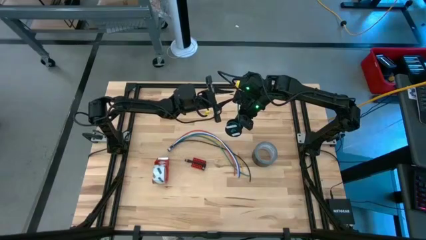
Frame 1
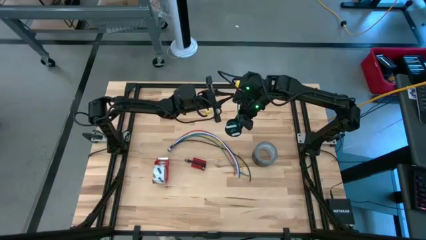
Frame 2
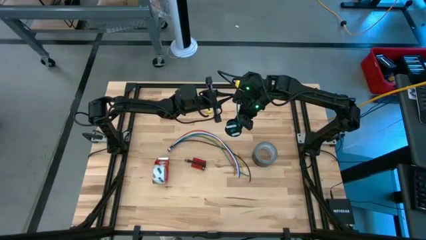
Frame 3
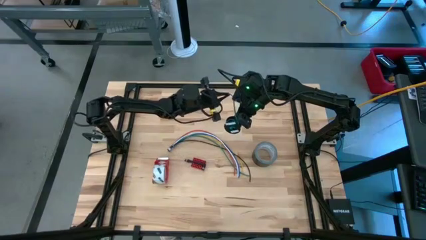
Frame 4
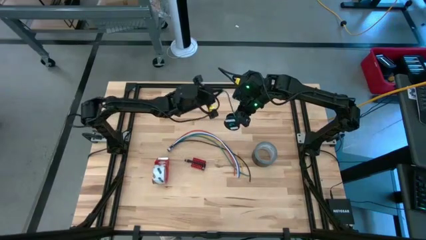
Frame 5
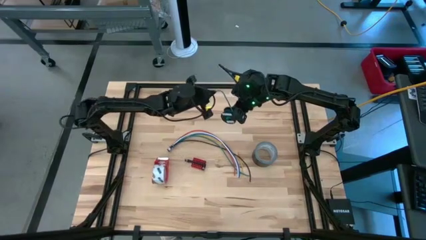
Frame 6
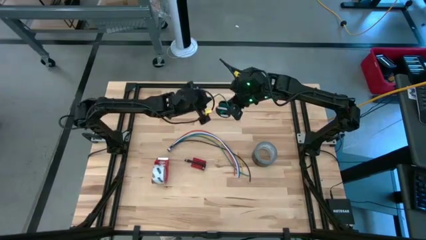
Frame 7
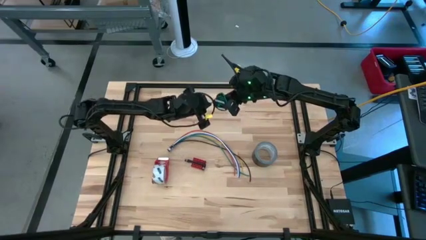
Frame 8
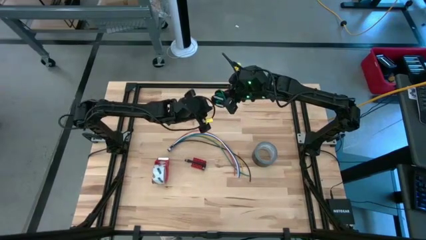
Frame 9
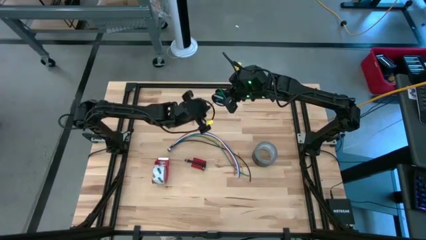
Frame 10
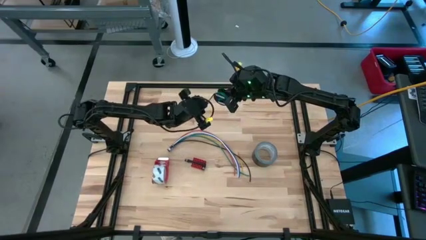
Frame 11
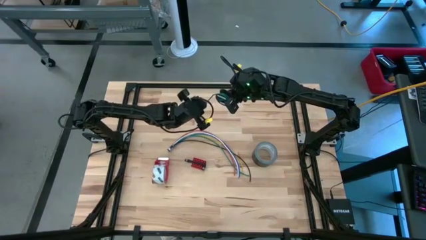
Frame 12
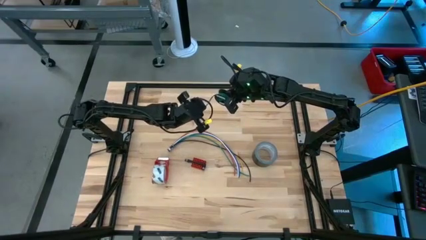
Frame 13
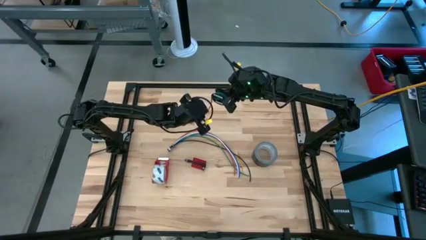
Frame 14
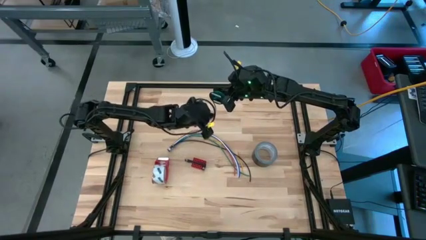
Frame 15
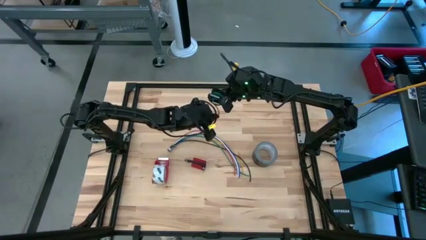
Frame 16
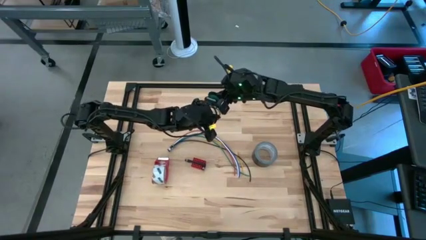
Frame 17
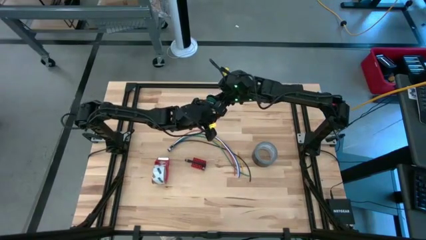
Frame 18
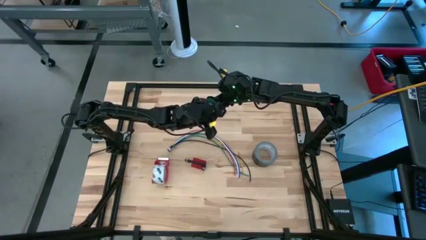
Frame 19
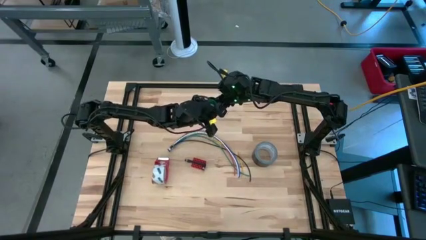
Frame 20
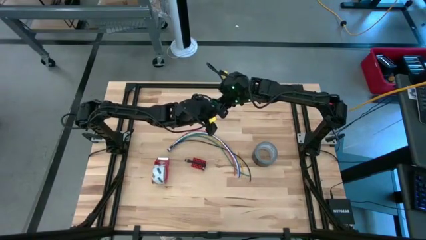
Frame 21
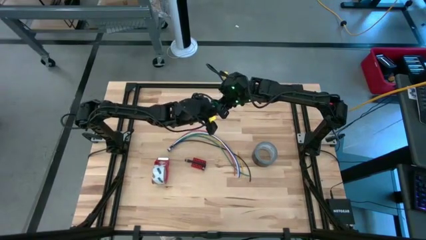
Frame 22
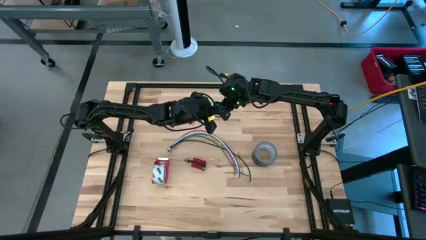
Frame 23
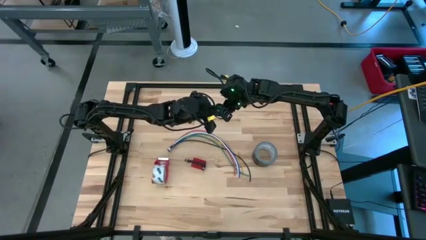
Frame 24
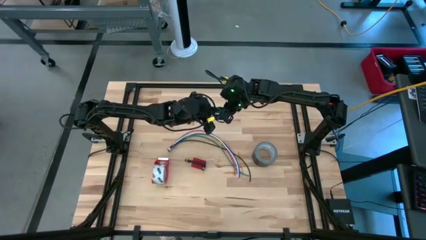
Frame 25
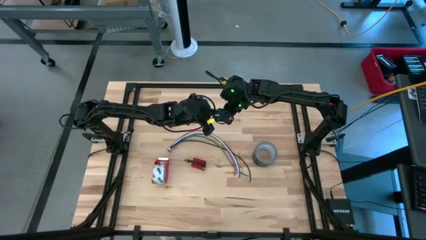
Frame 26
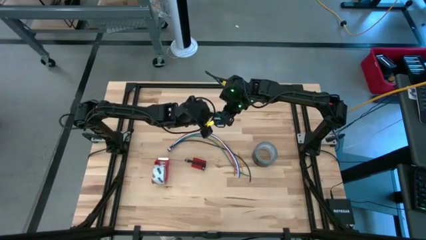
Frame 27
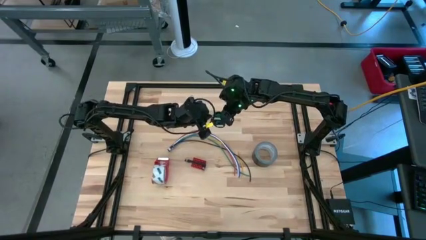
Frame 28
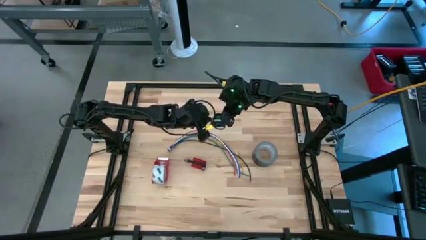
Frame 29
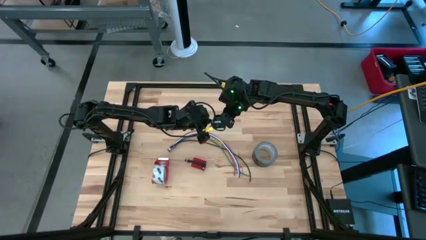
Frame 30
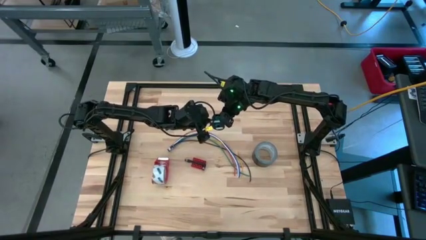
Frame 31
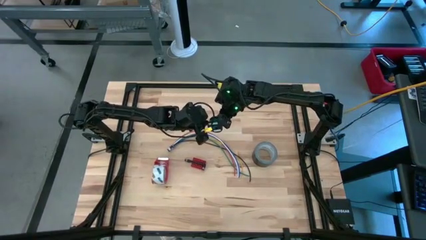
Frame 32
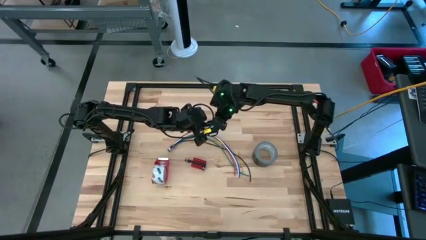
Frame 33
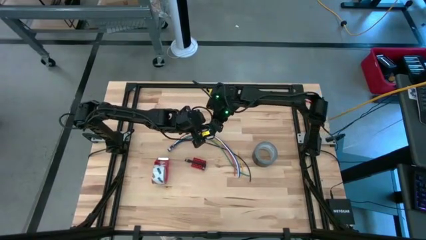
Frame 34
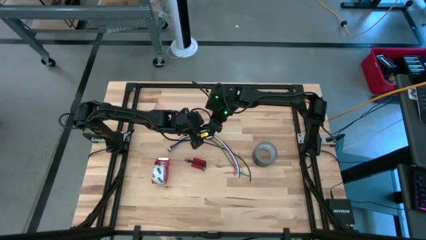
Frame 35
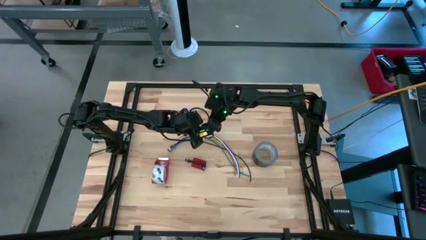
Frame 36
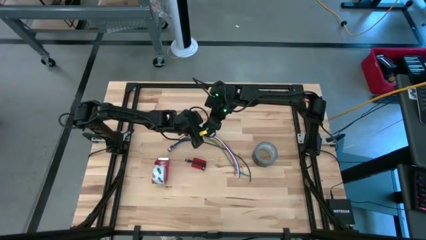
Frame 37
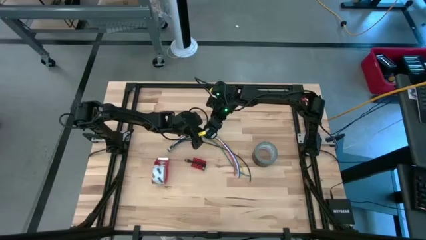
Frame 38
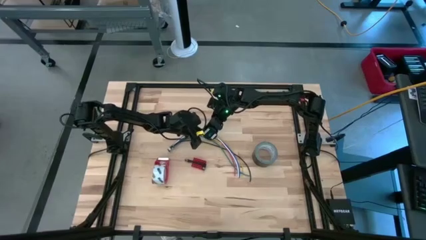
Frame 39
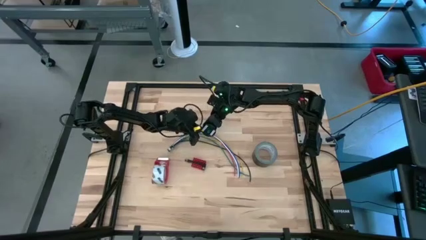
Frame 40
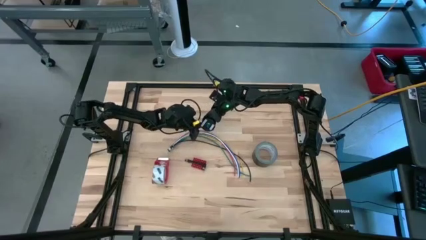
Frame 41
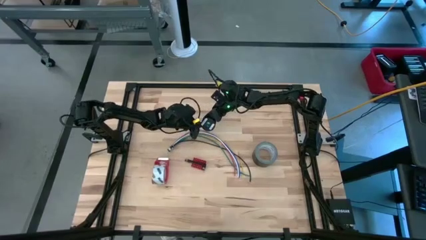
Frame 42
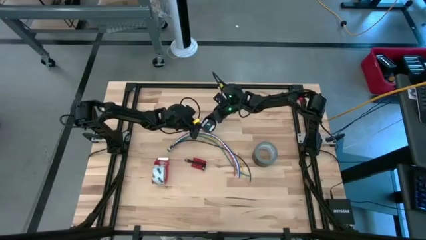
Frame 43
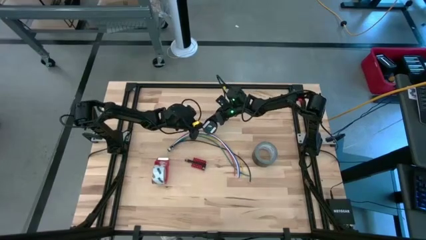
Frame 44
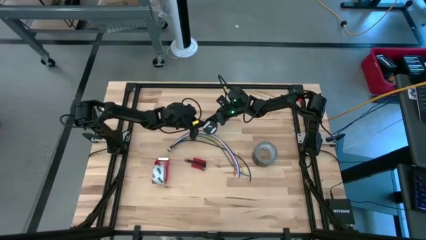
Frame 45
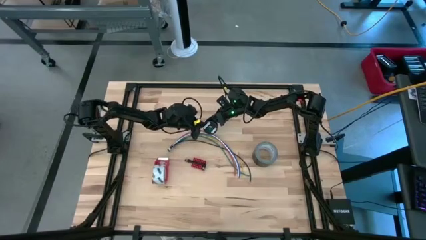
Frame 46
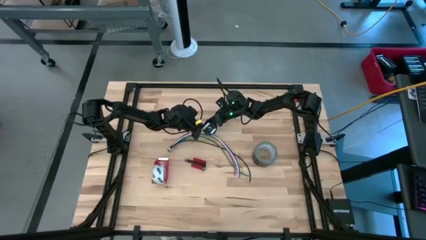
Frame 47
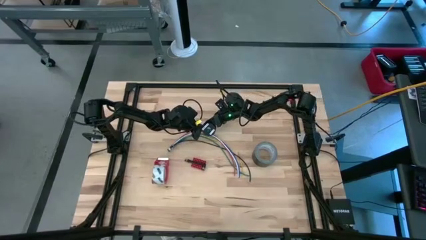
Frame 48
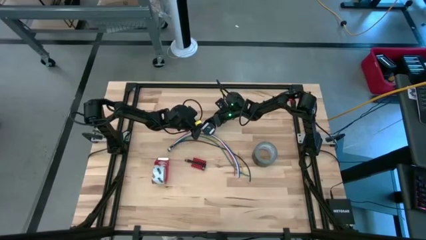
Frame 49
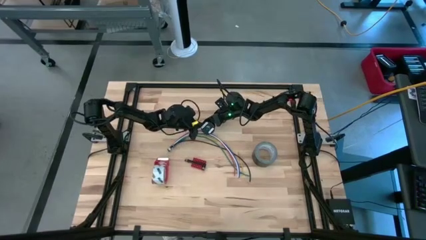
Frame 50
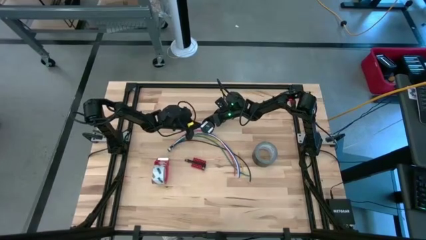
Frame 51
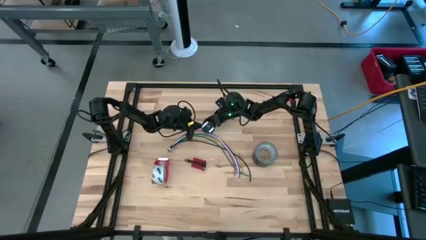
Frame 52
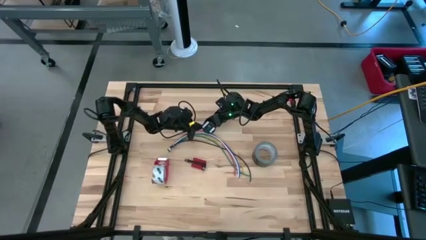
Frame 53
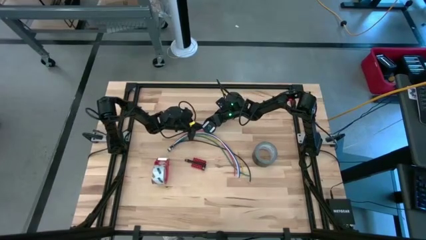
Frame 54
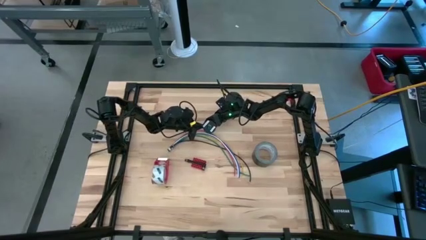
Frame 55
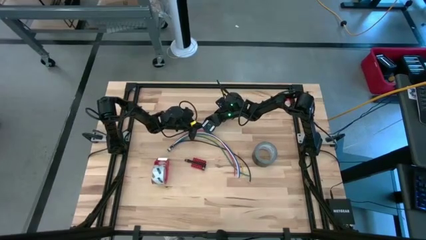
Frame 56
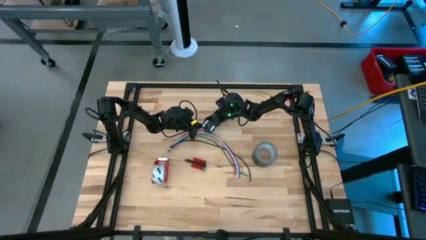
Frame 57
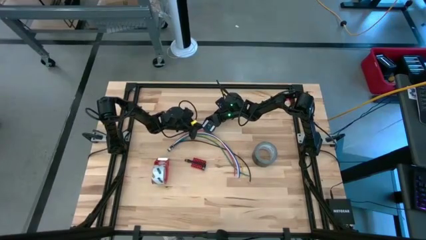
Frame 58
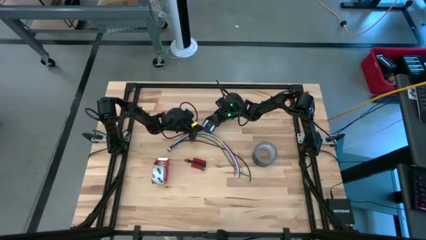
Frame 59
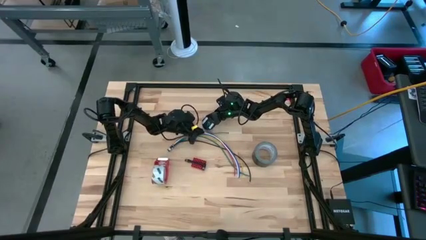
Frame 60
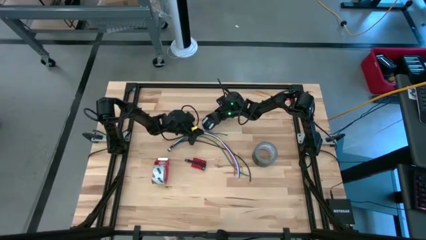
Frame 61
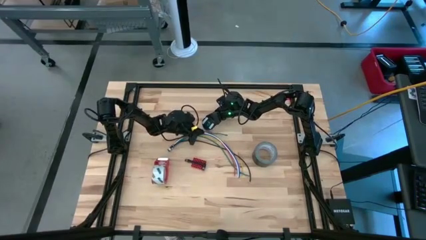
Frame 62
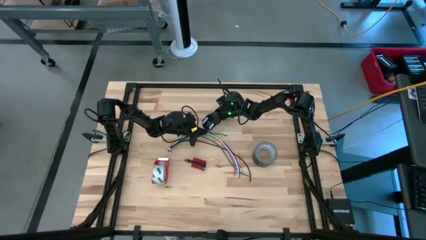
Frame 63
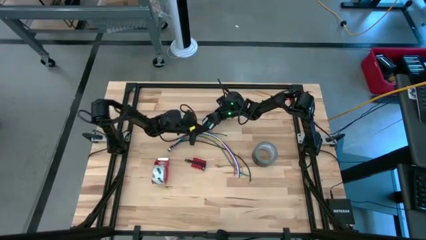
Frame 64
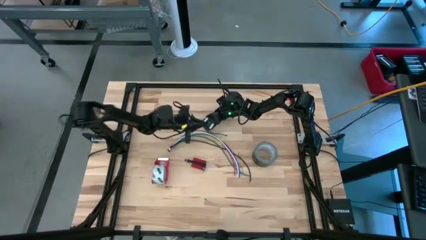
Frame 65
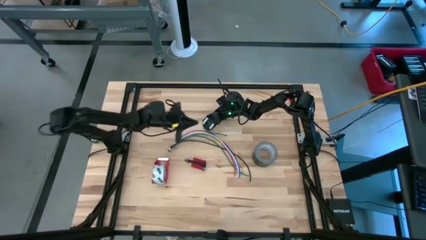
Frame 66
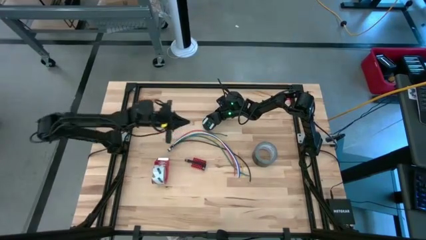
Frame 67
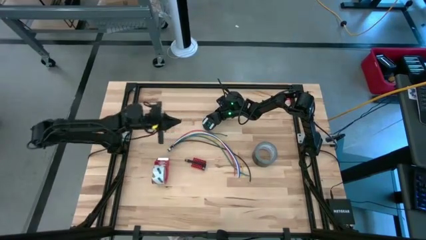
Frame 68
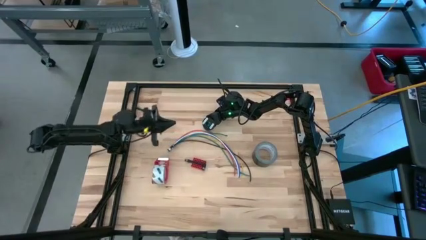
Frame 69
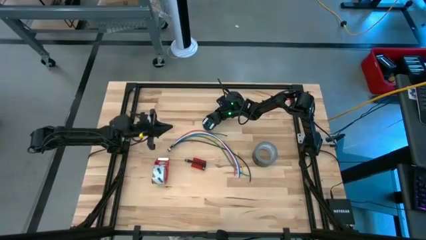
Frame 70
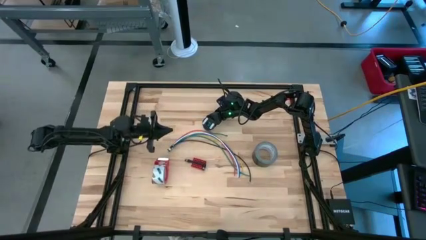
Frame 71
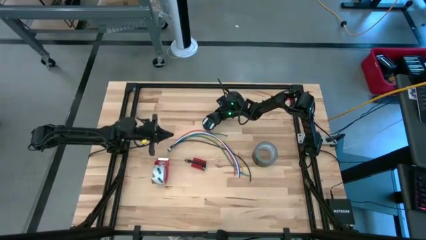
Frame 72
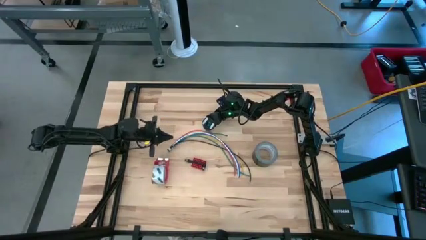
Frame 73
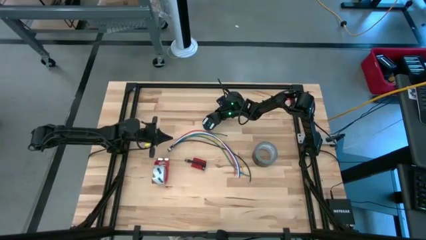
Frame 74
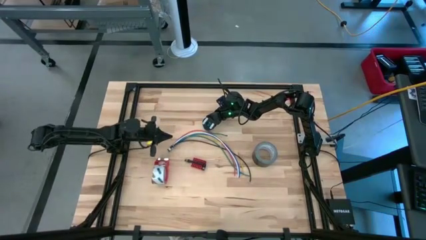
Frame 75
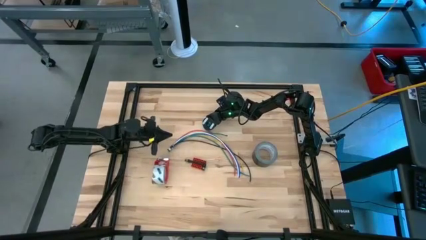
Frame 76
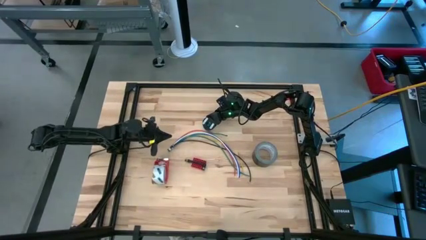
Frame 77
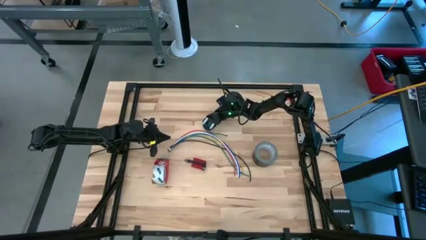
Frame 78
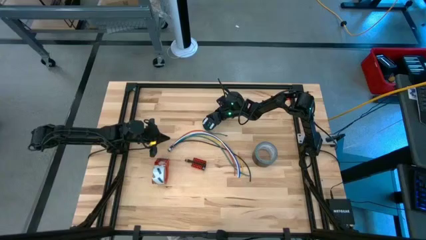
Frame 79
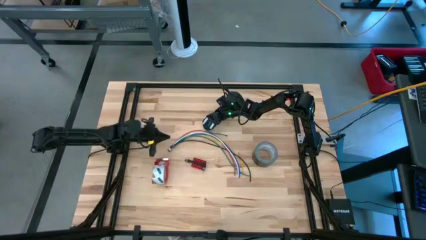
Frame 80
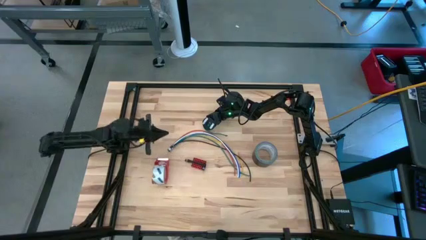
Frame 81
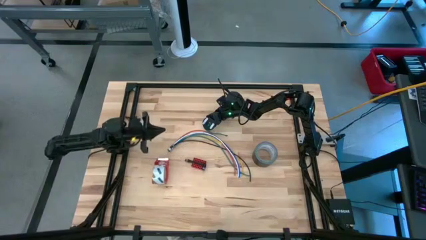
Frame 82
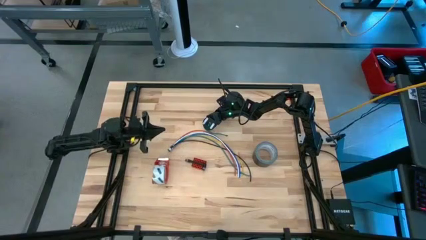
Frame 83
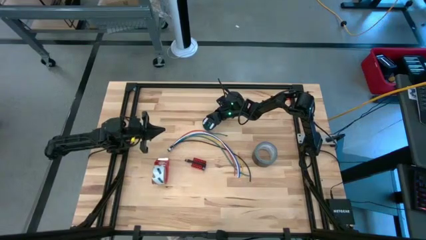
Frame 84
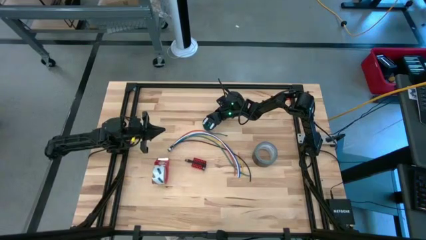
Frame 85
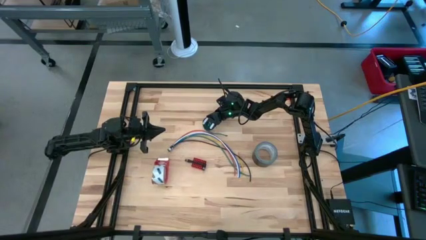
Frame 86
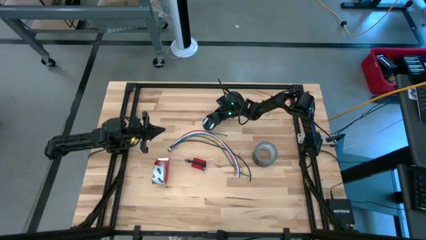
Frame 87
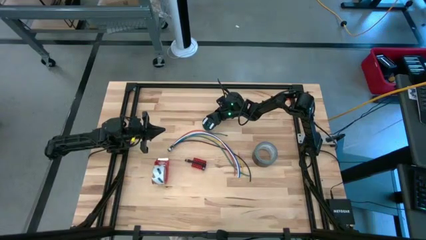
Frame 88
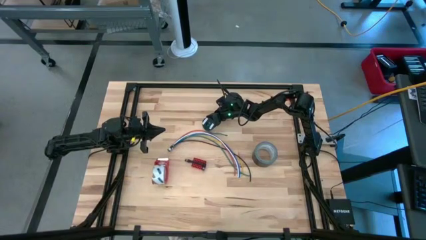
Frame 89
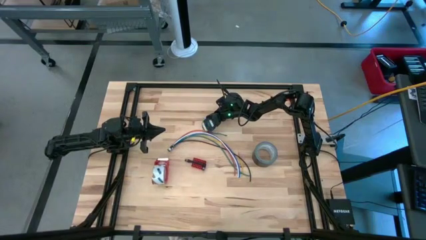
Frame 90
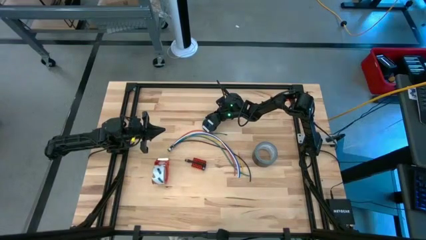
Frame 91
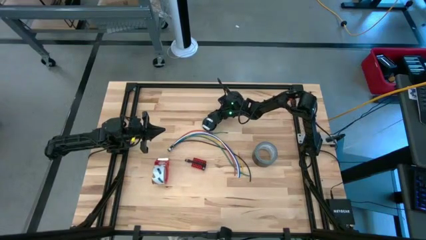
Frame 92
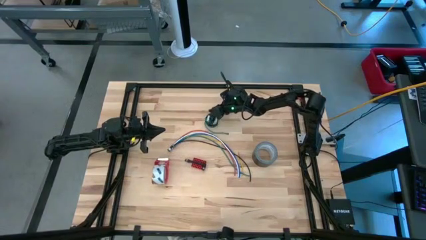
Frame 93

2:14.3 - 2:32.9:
Task: Coil cords
Coil the green wire onto the black spool
